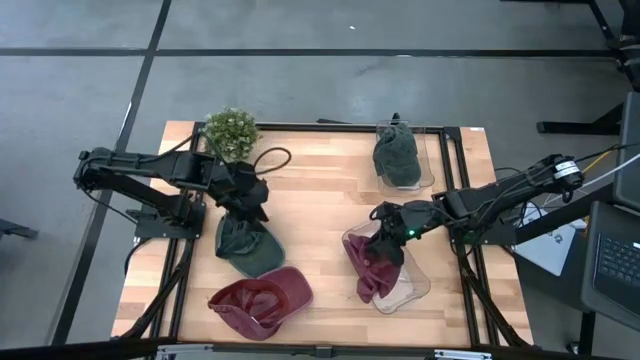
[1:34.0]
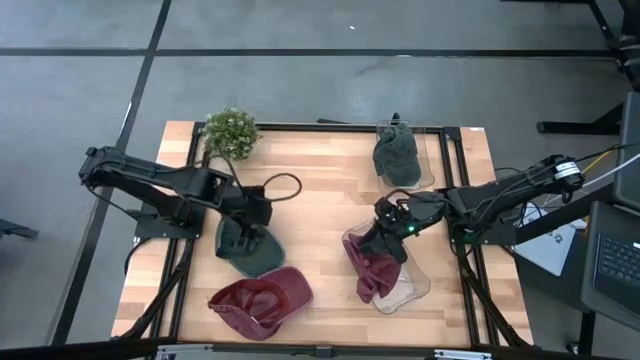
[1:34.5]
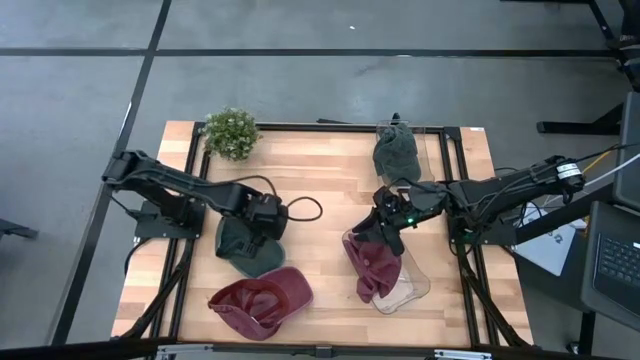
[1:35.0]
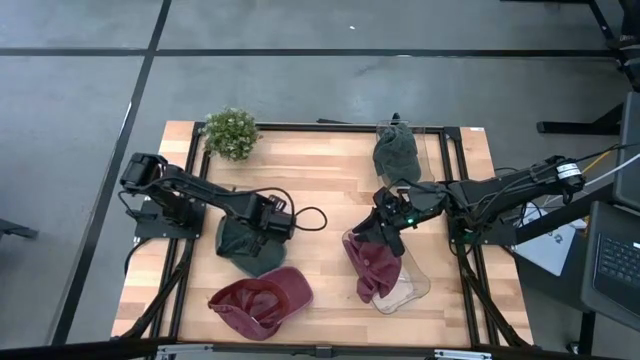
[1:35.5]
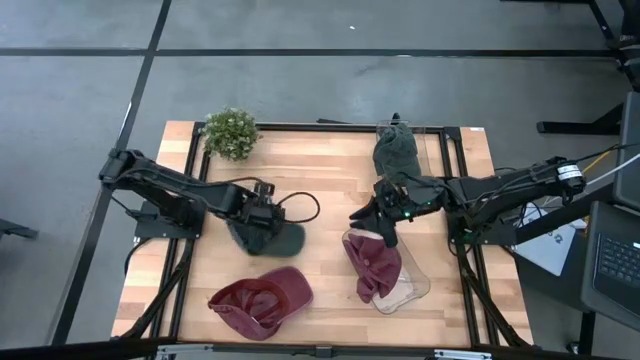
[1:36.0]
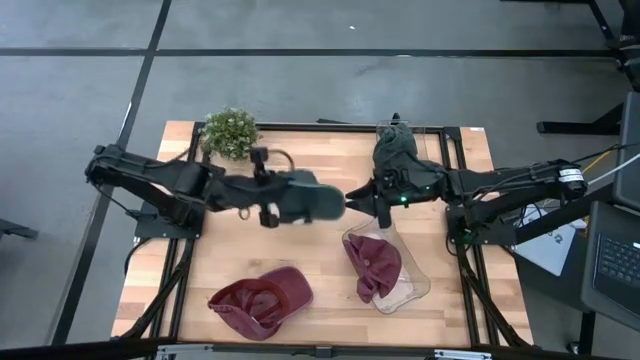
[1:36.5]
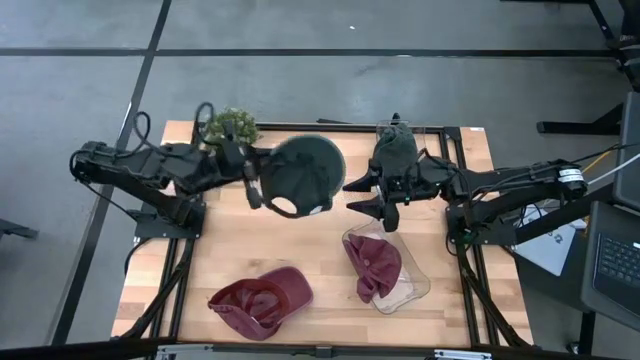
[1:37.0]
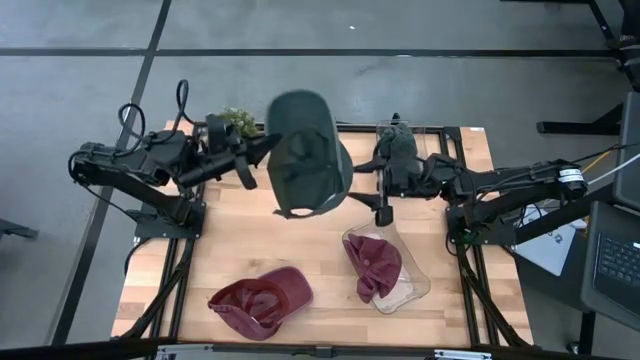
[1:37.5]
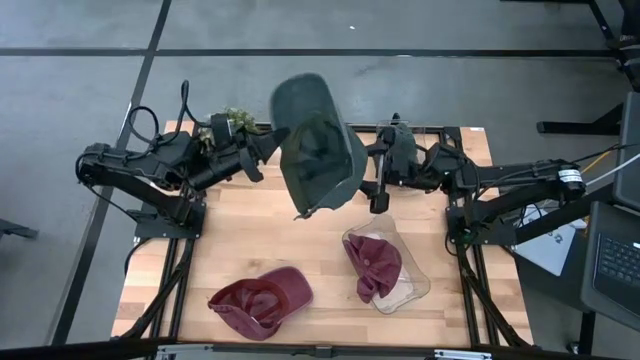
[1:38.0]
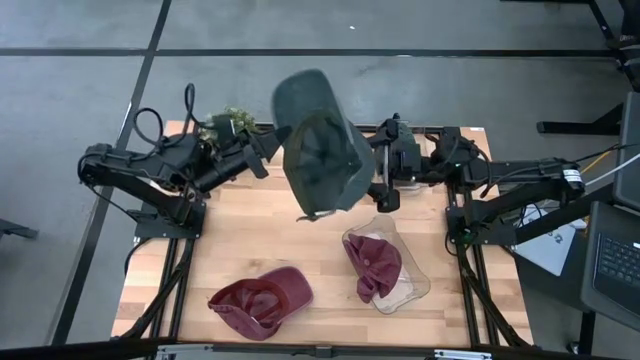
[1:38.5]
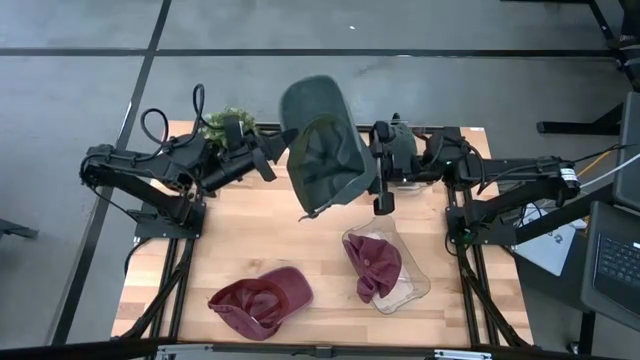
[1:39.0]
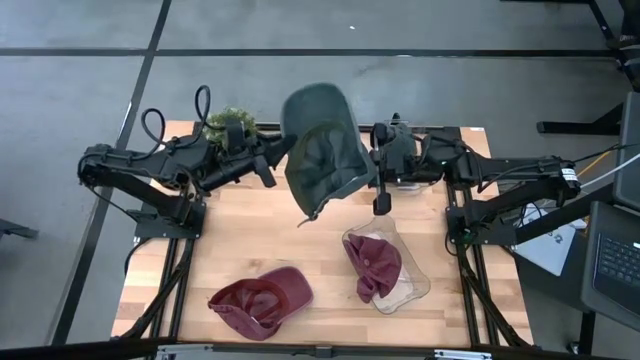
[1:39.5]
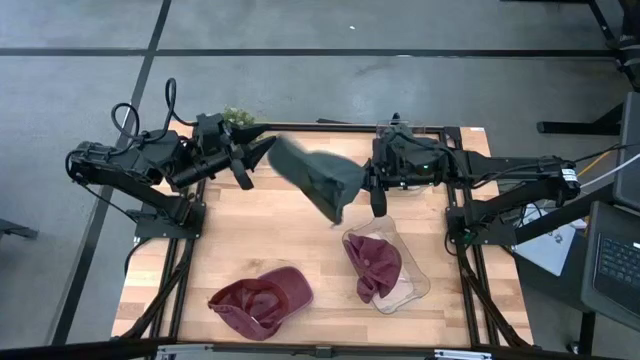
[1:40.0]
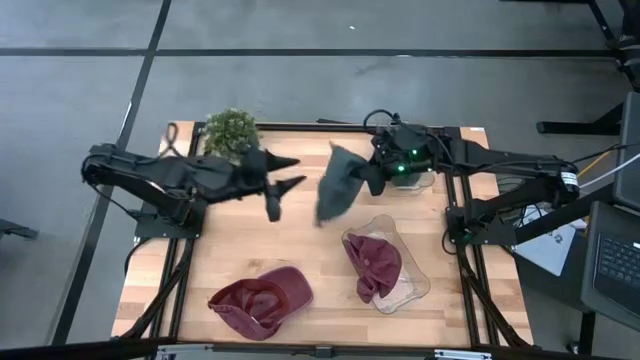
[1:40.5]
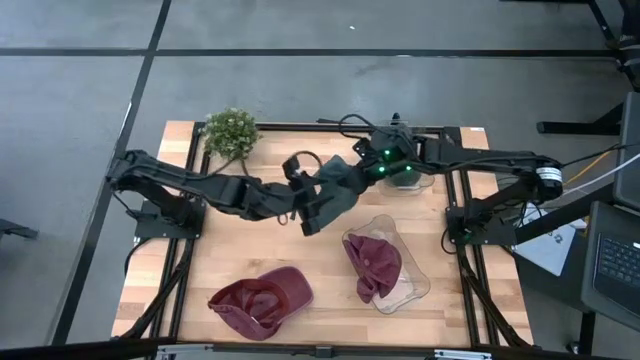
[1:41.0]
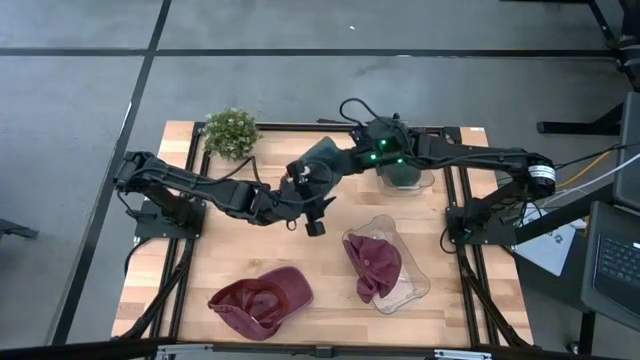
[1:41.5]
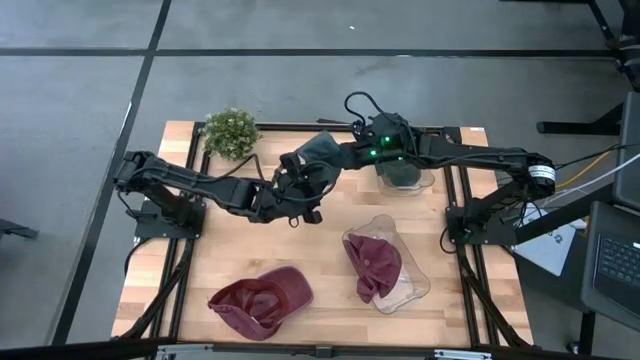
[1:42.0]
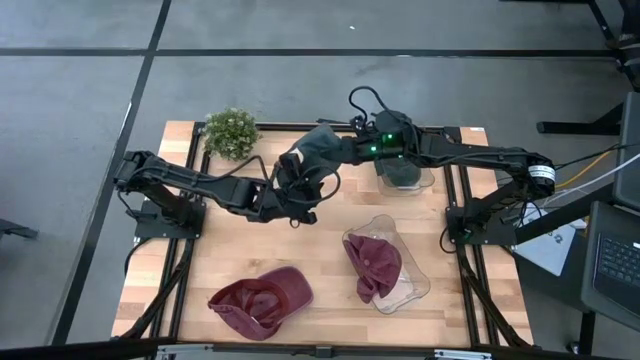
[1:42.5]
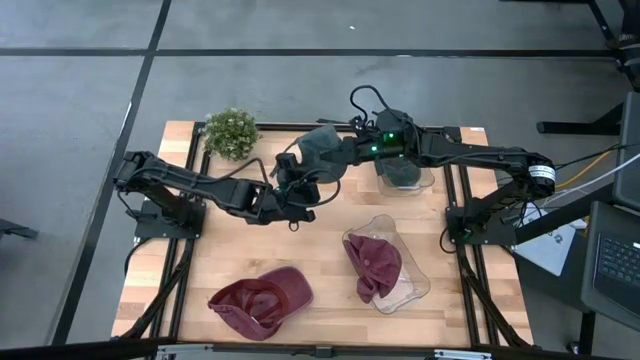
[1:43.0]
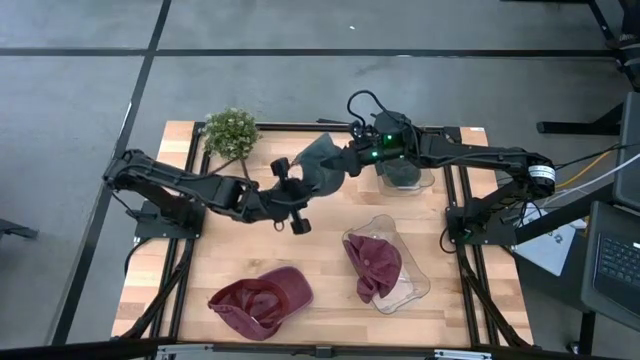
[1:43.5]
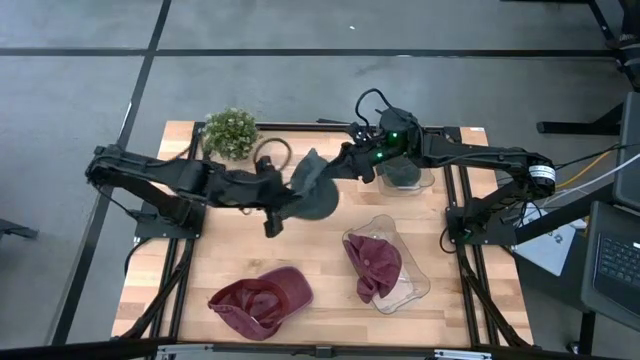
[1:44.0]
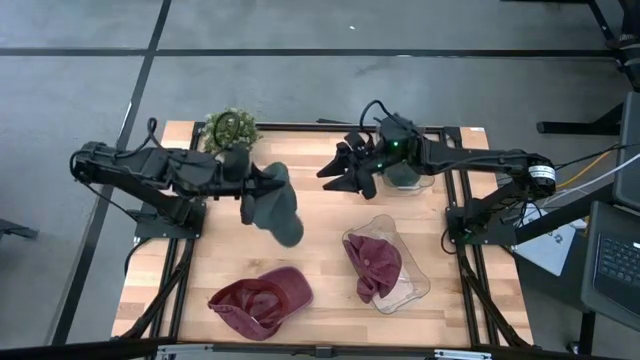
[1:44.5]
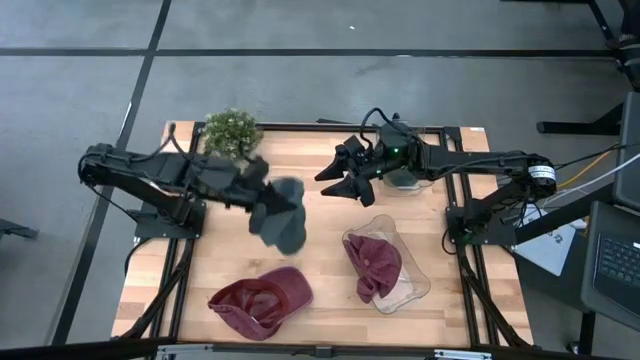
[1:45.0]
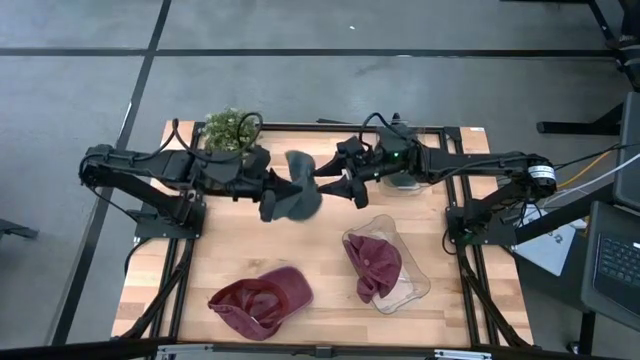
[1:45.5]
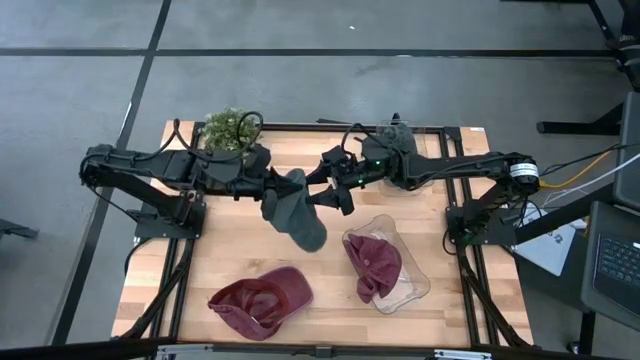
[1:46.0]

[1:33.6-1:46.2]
Task: Pick & Place hat
Put the black cap into the top transparent bin

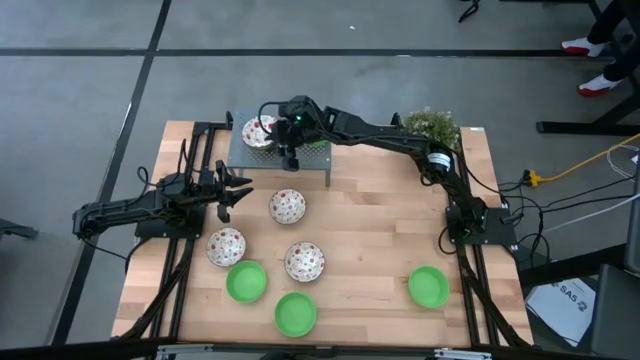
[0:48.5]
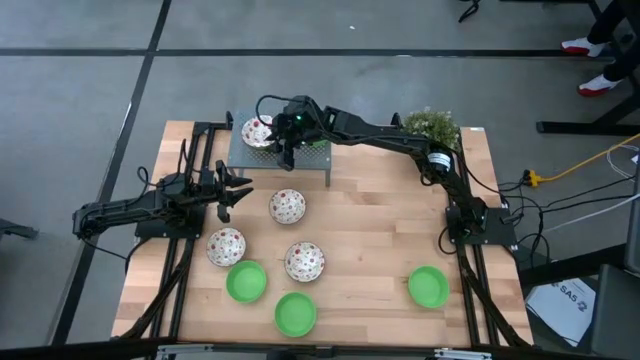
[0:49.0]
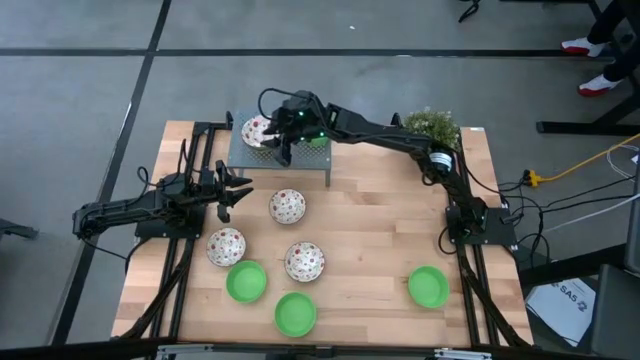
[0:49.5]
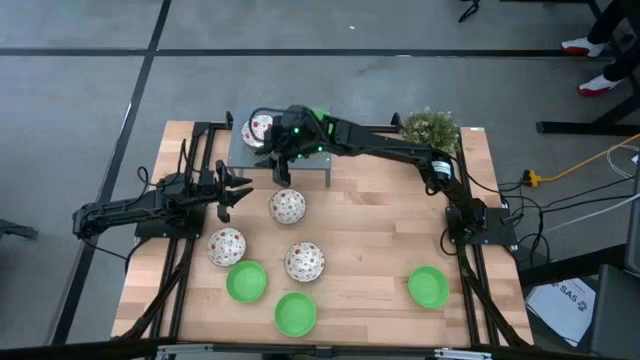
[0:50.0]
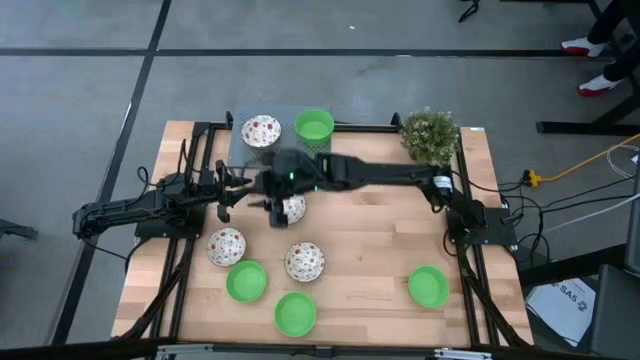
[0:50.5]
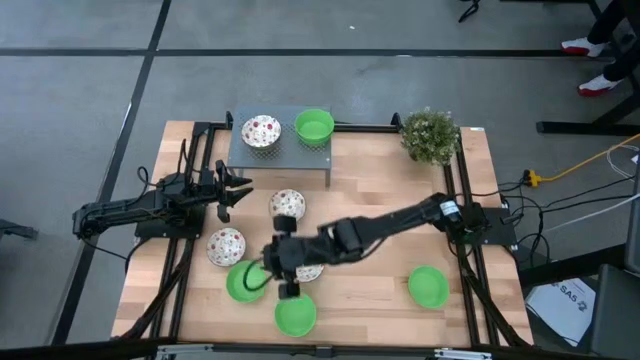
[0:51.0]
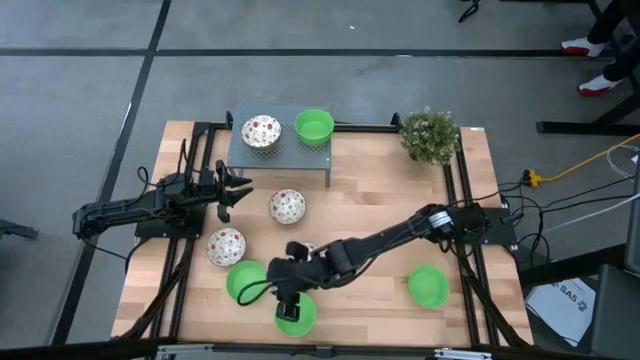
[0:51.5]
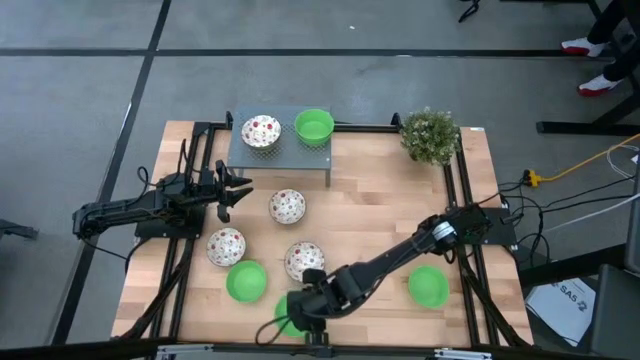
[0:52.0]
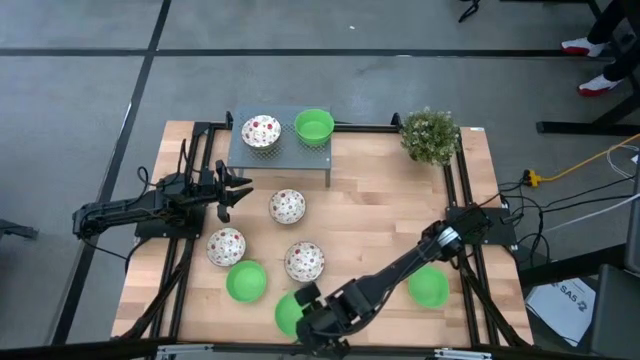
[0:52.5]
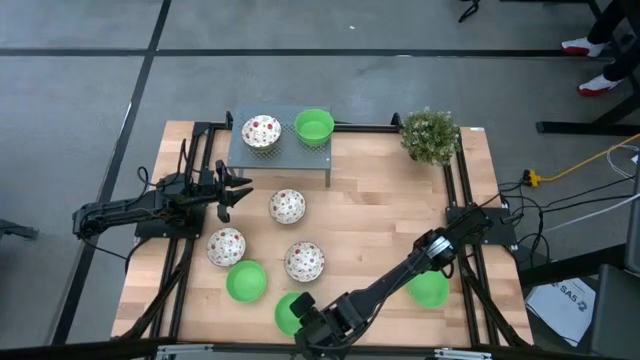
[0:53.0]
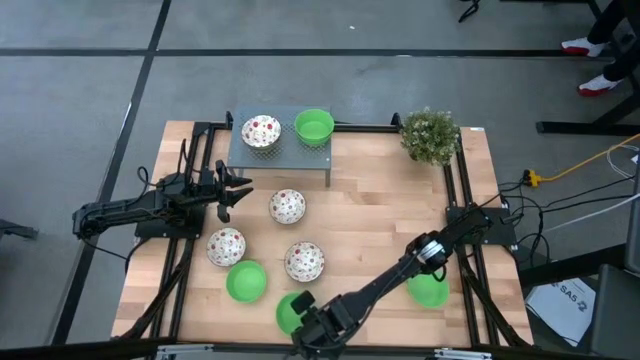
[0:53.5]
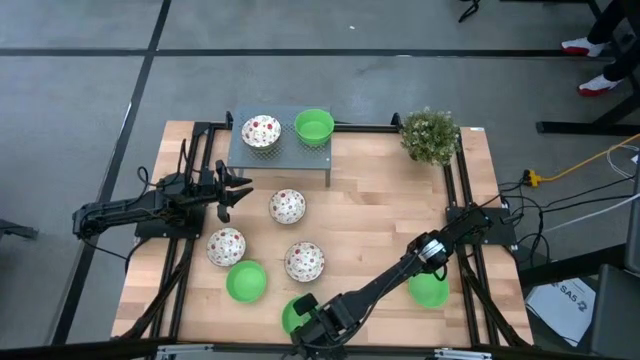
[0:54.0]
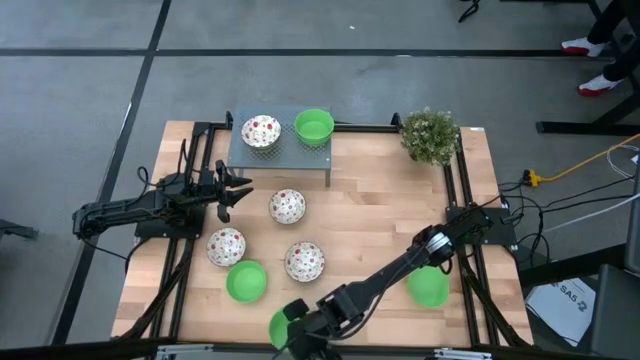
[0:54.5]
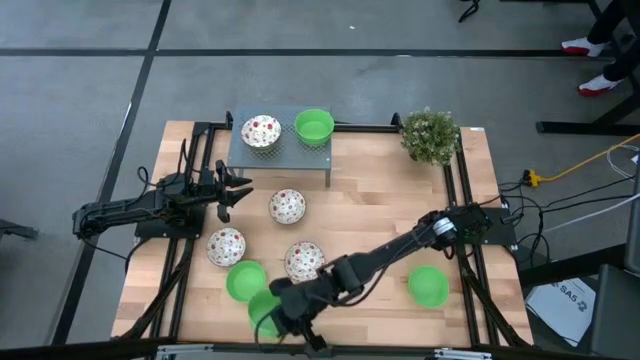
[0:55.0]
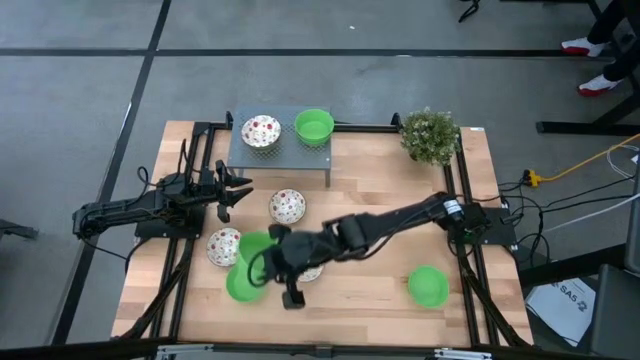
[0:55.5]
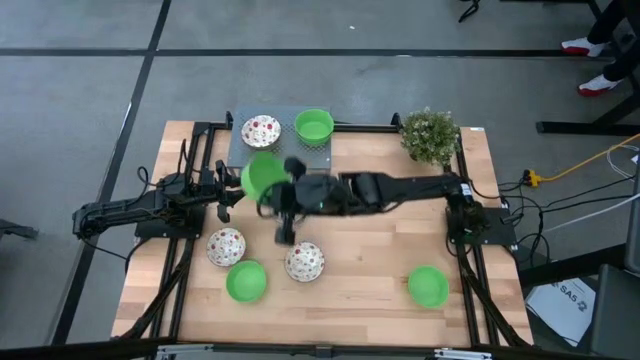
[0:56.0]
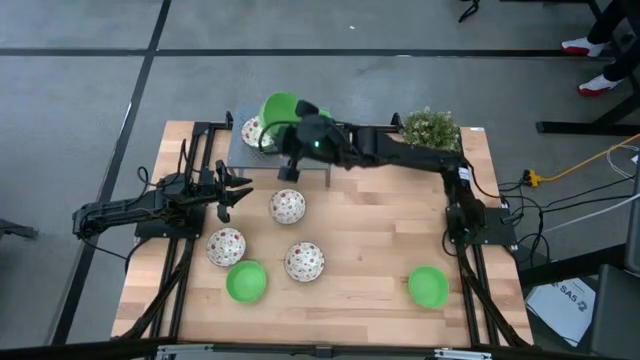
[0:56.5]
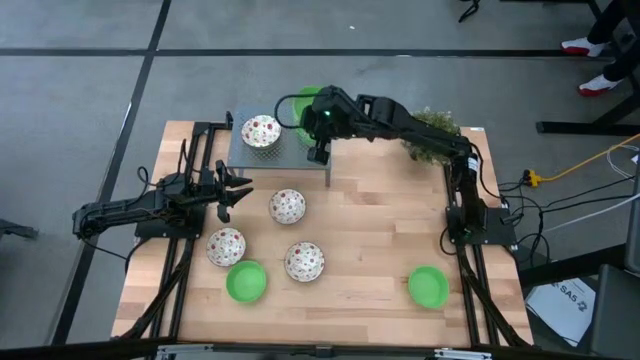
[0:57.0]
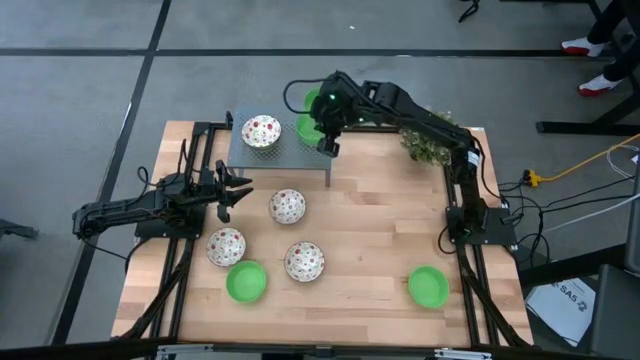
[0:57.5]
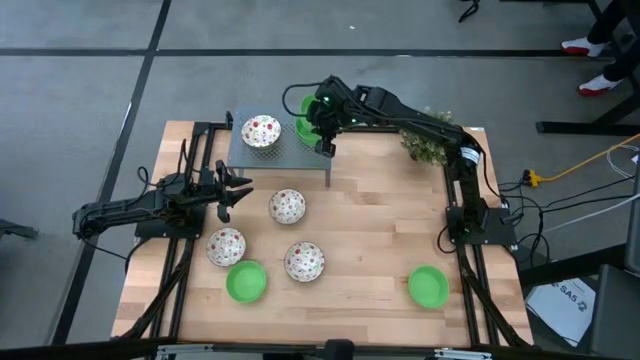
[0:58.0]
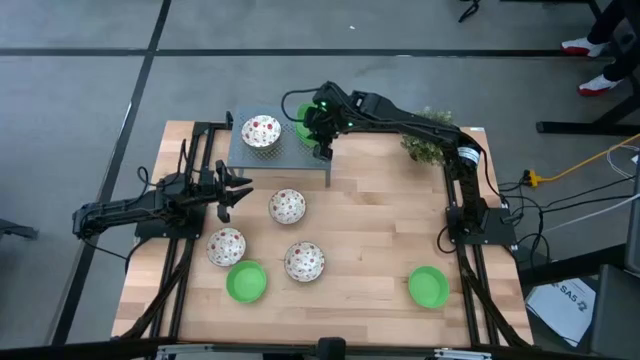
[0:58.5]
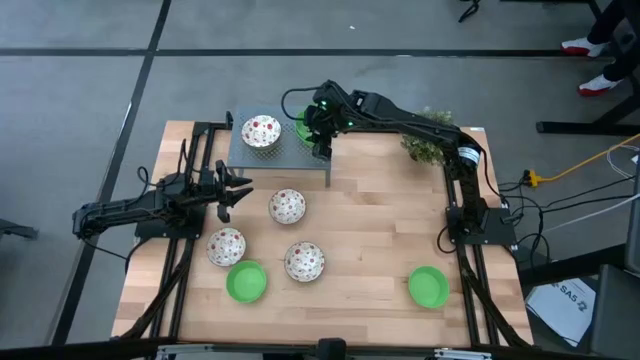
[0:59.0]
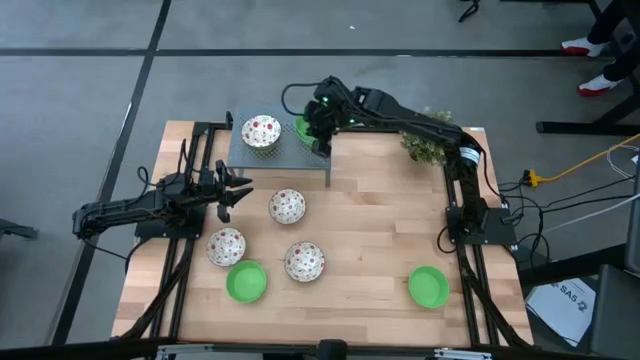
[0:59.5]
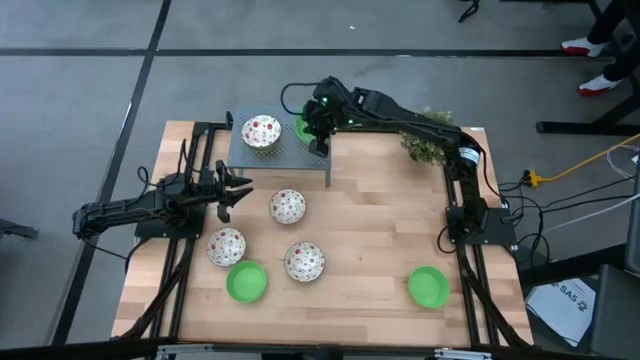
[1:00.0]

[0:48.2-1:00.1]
Task: Pick & Place Mini bowls
Stack the green bowl on top of the green bowl on the shelf
